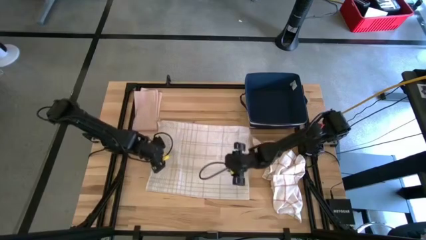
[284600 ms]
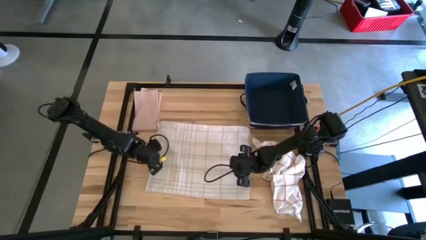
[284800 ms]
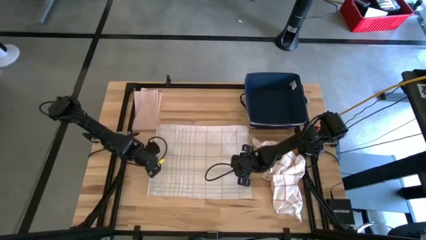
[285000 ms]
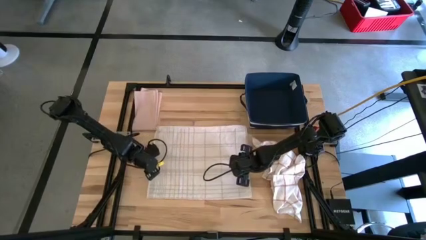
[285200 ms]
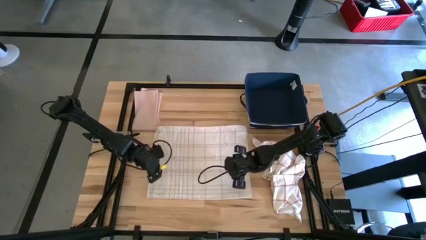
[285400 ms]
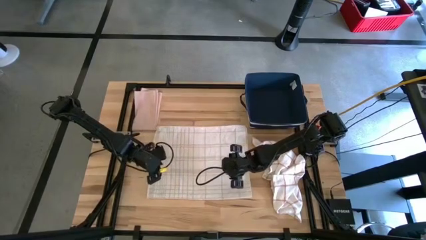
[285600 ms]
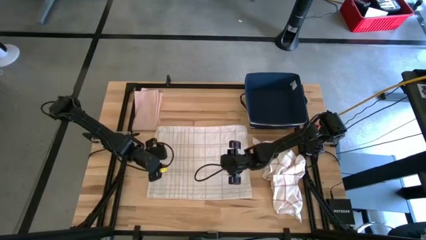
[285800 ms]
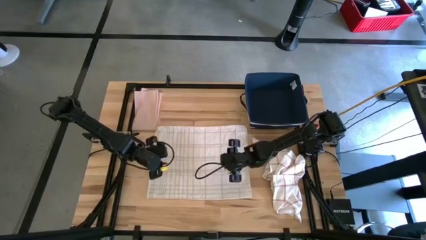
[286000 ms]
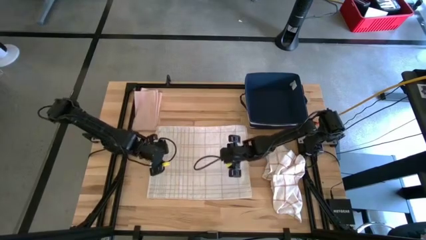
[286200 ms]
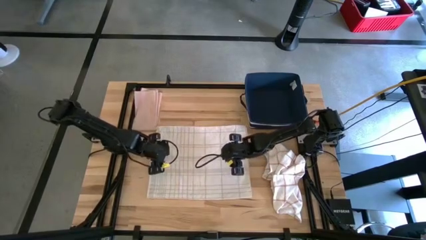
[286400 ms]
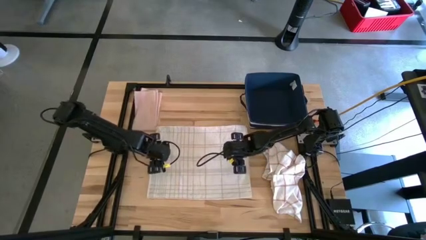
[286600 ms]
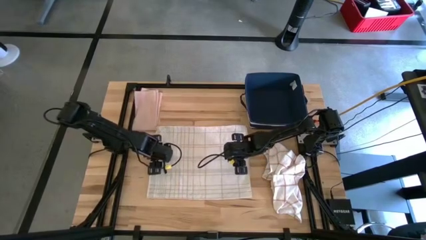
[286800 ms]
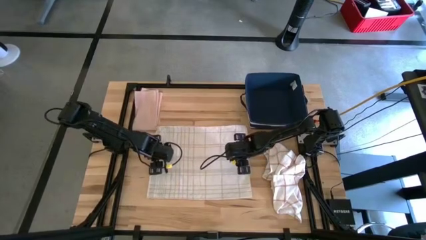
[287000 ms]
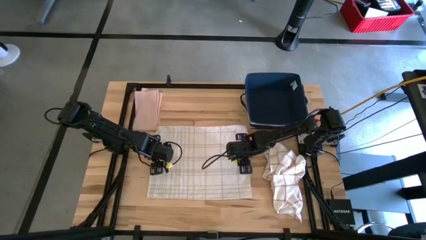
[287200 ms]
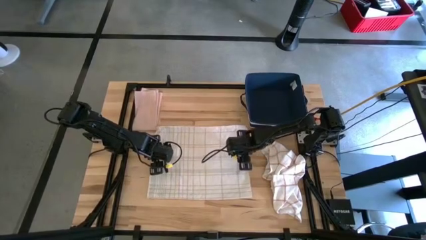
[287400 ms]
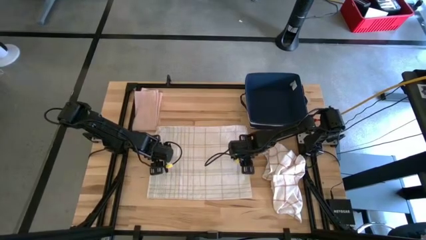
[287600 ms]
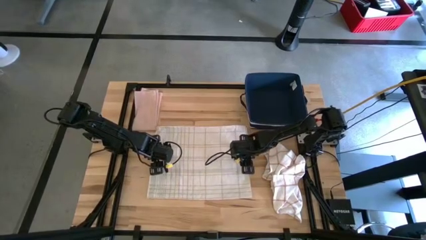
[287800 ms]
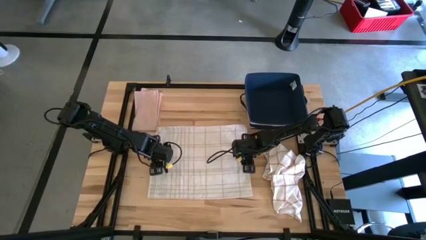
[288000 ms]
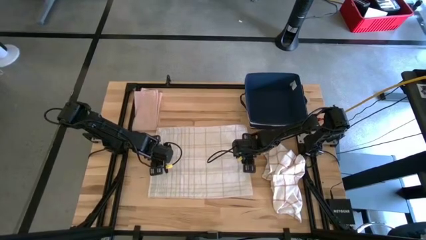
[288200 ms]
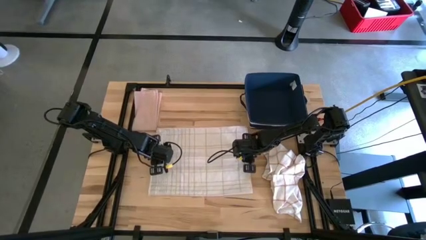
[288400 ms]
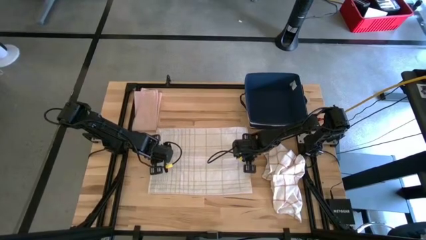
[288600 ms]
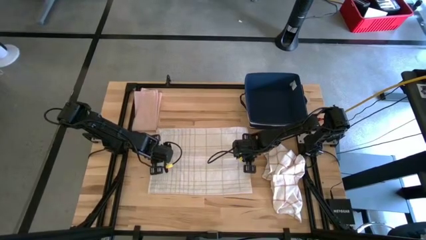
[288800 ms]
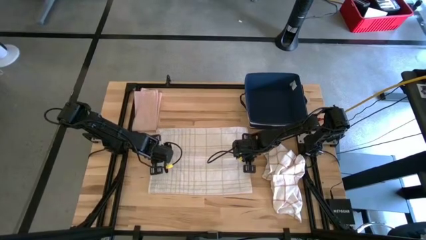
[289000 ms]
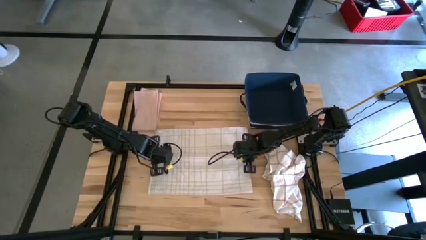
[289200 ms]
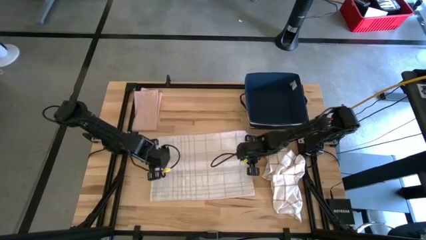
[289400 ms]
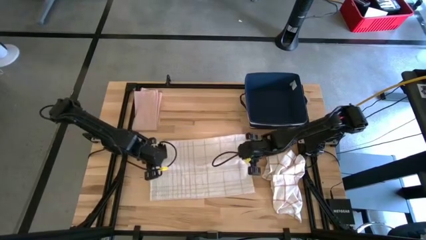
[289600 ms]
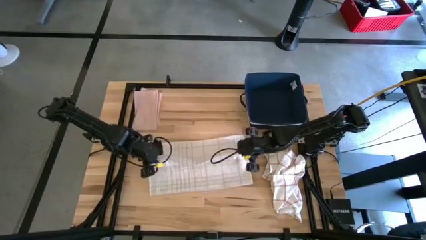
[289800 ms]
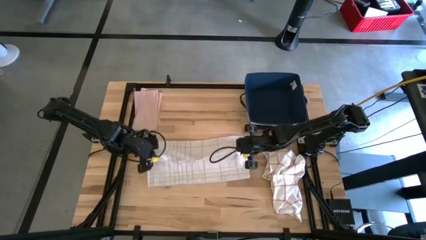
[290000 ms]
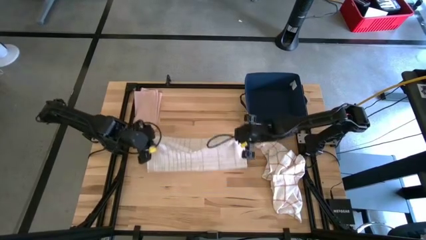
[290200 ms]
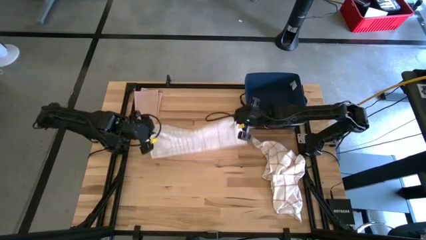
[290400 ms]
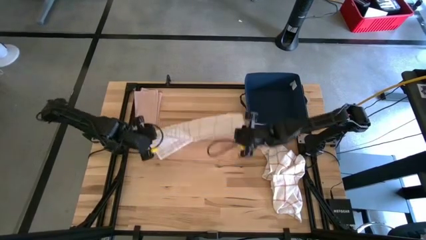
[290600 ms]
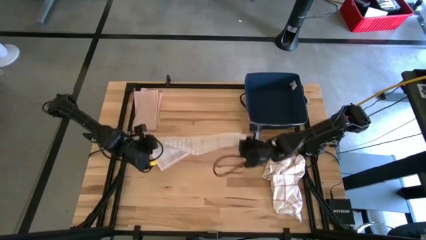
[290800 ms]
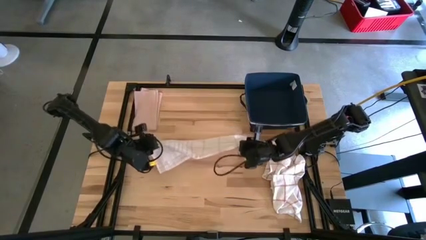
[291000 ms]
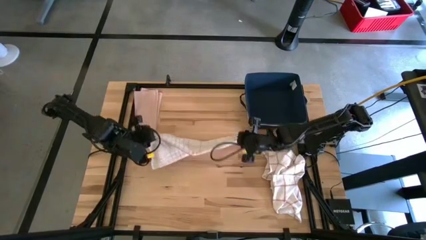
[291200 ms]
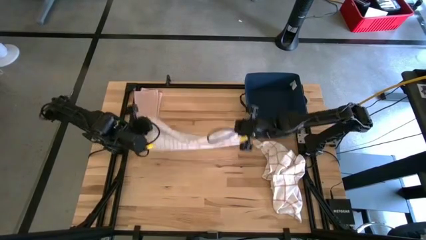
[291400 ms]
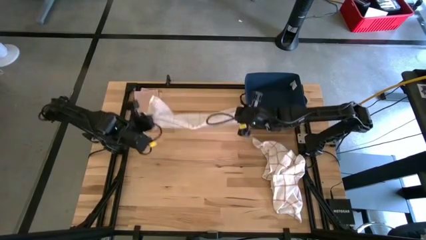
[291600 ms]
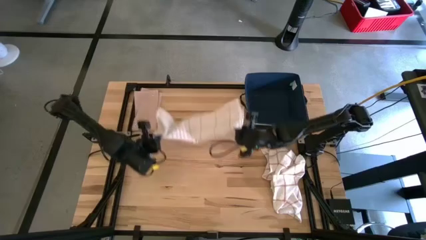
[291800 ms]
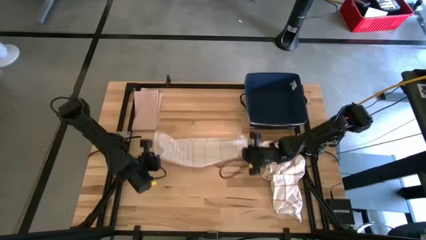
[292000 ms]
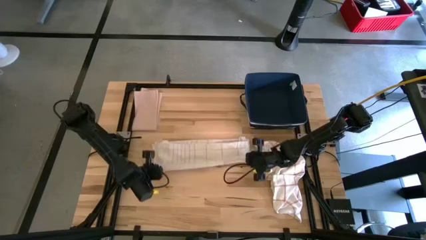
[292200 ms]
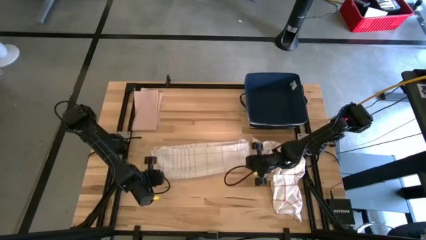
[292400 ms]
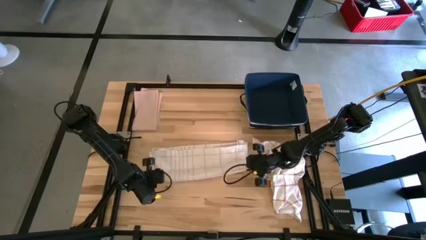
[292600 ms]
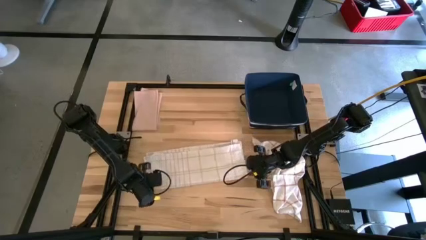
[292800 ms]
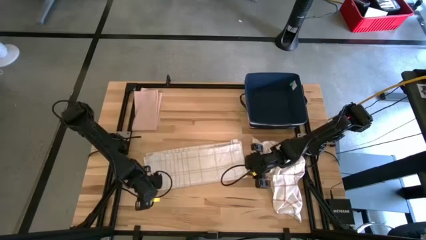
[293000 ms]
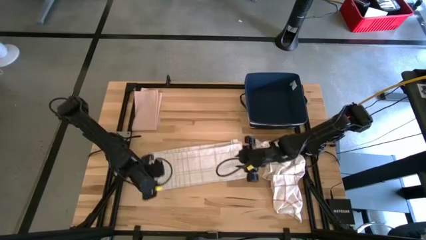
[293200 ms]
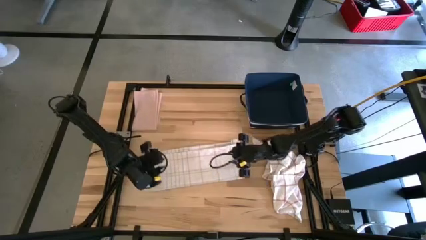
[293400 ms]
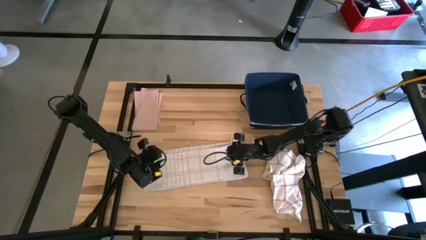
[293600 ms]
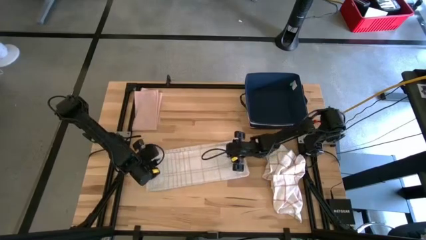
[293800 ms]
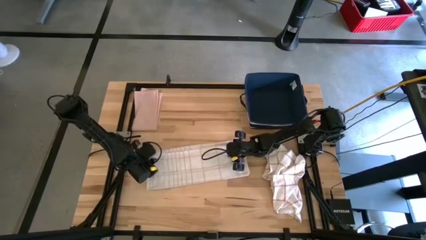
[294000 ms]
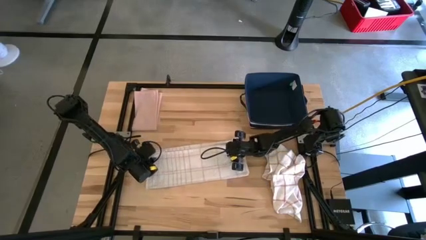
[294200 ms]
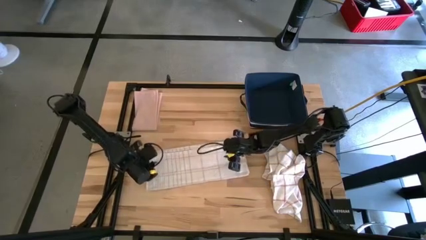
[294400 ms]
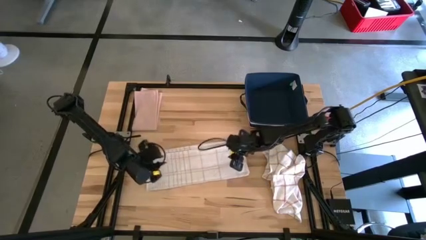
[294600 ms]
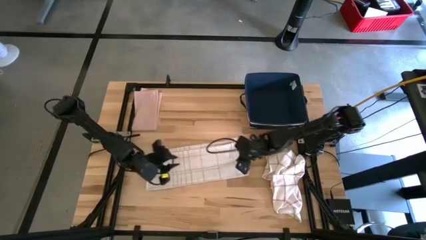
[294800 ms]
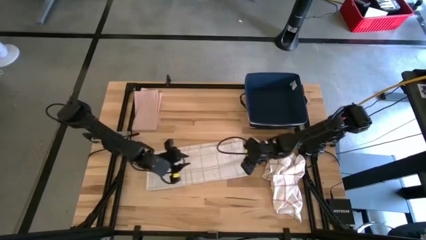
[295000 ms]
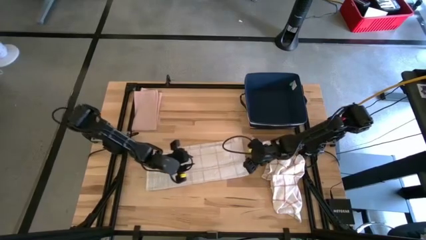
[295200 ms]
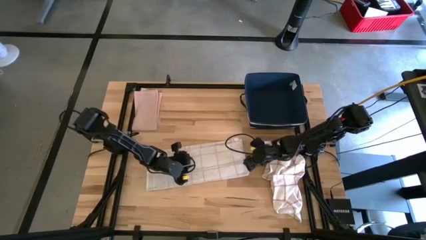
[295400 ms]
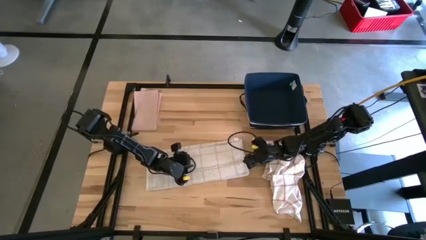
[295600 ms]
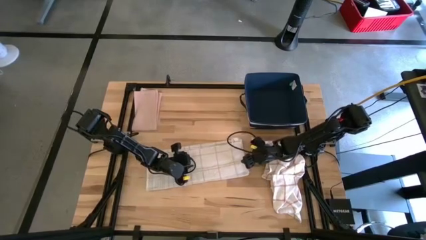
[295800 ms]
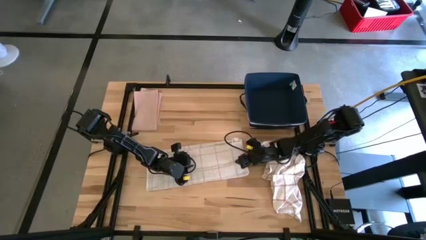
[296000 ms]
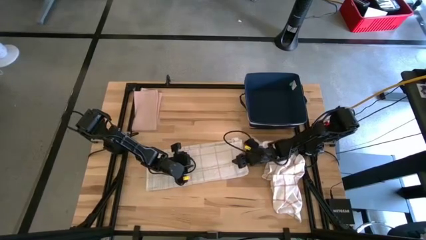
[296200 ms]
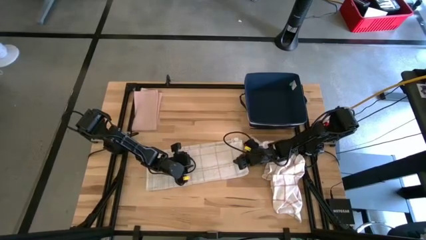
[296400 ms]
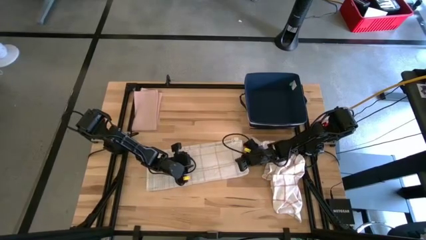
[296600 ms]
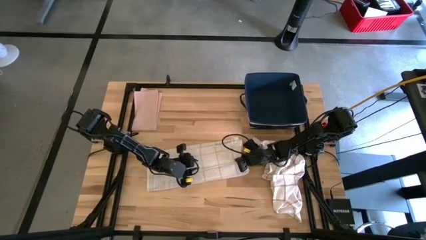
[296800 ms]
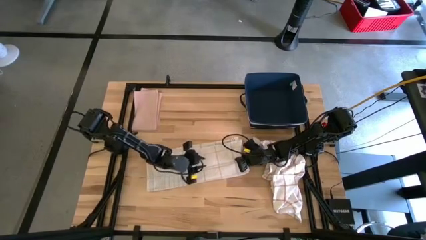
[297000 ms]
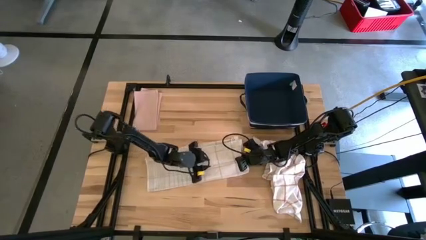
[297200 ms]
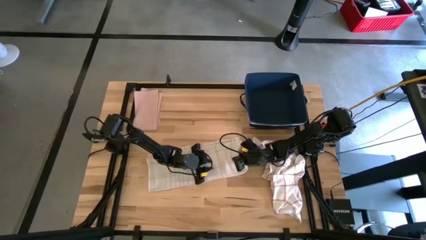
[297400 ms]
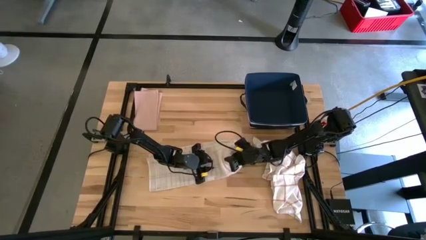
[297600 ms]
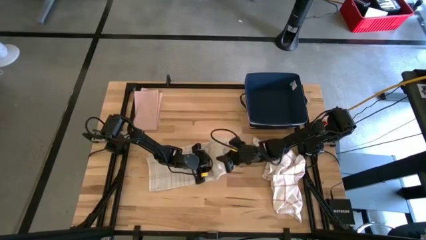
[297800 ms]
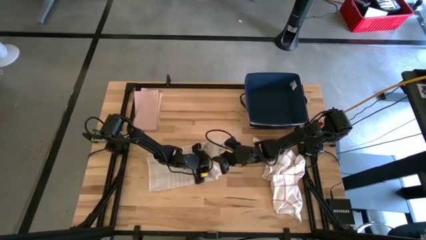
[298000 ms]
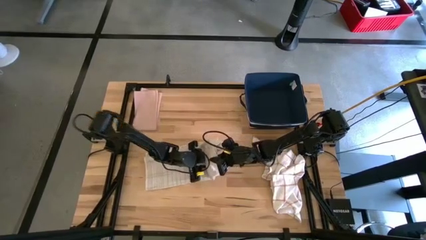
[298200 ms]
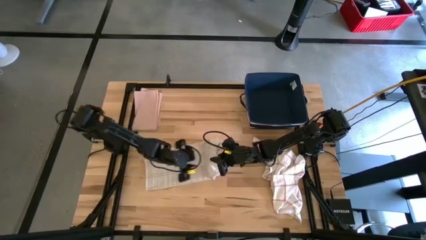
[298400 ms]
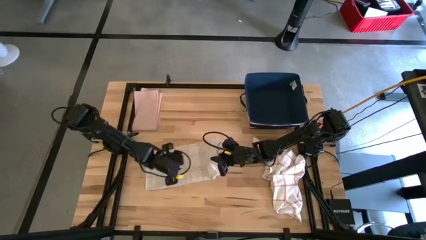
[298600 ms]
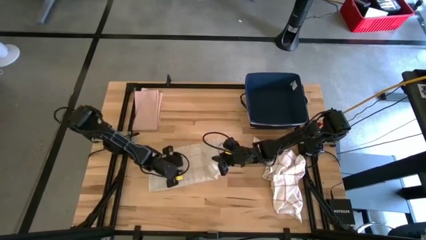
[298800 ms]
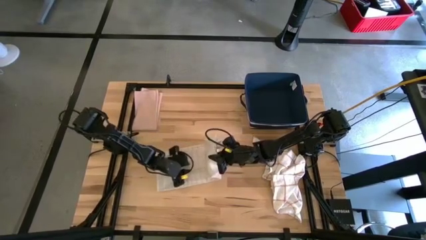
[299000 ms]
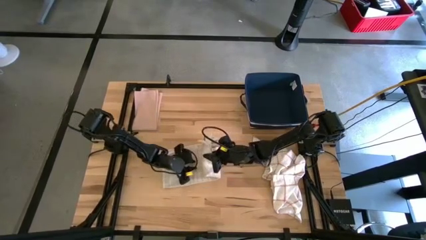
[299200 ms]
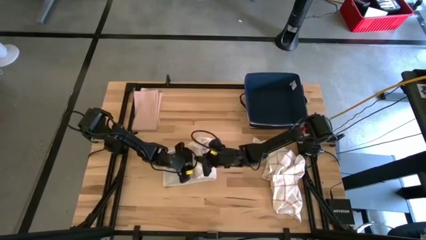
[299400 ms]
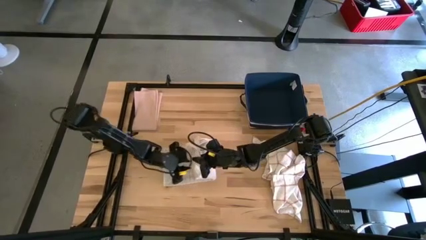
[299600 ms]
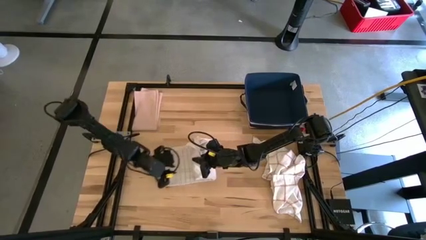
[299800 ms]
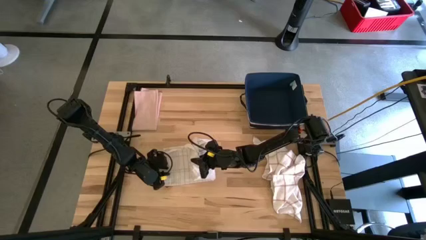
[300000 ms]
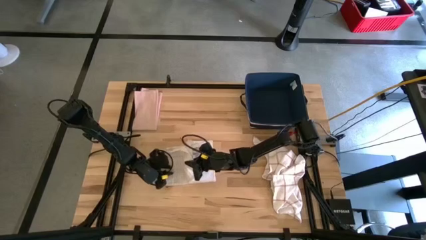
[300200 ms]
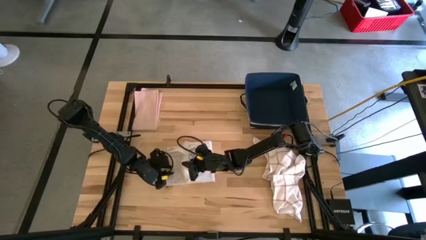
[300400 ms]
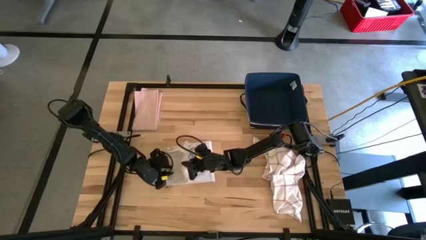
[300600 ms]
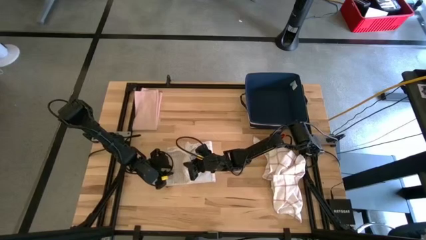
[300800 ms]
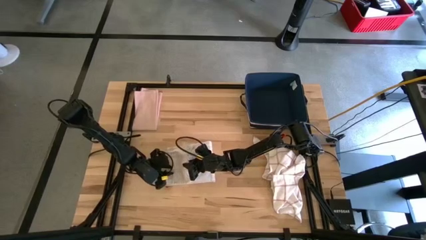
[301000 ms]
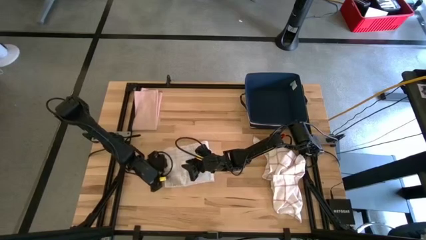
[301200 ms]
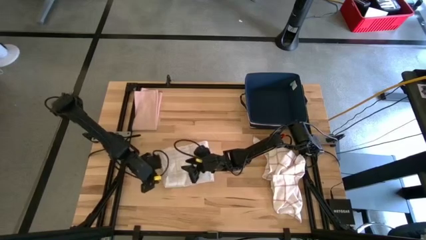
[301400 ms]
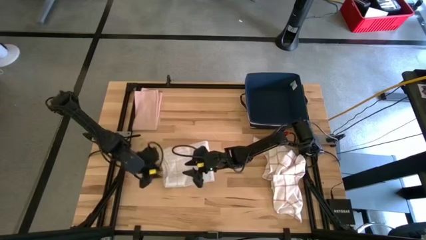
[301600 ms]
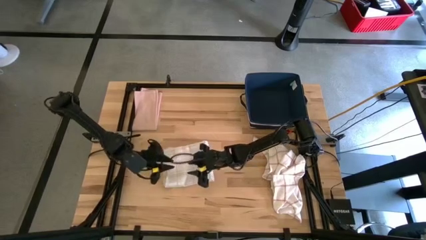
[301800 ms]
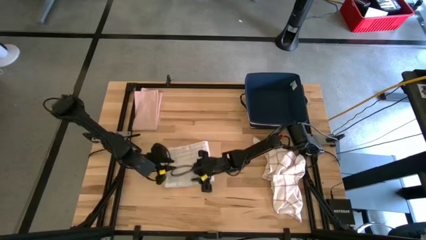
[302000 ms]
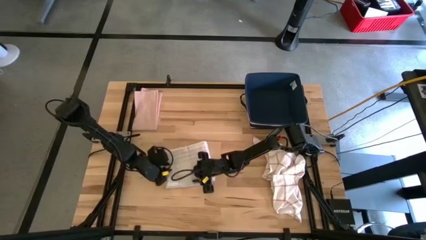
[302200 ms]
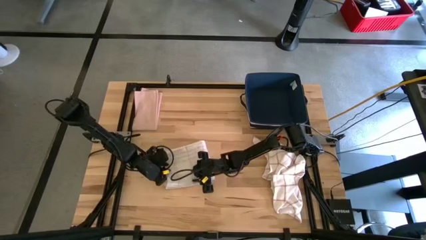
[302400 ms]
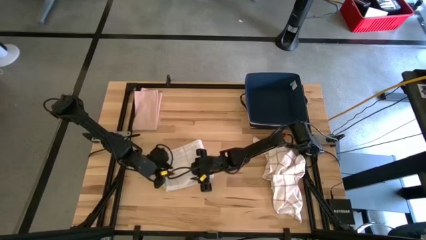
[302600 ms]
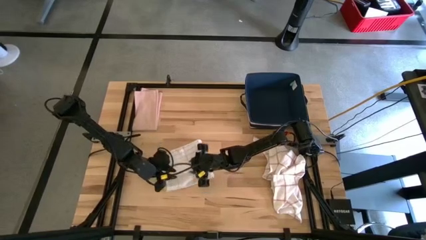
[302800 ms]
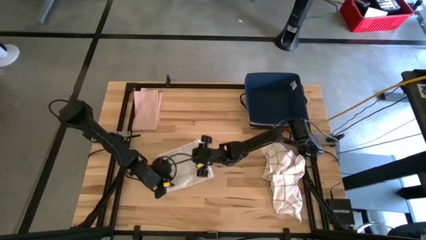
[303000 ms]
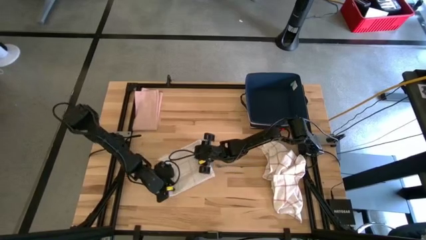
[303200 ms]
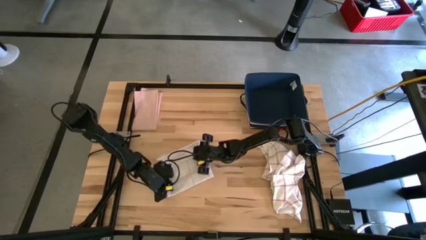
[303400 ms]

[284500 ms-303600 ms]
Task: Fold towel
Fold the white patterned towel
